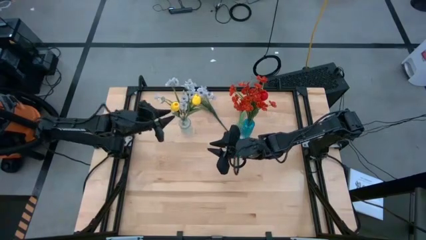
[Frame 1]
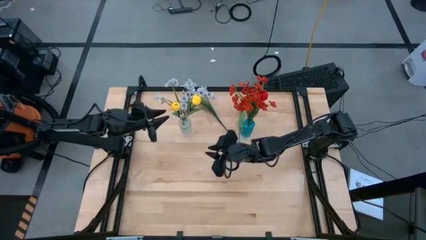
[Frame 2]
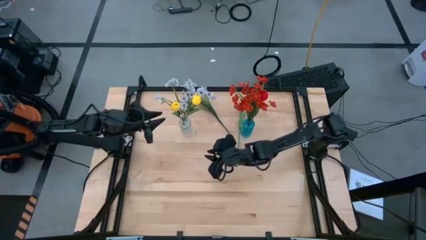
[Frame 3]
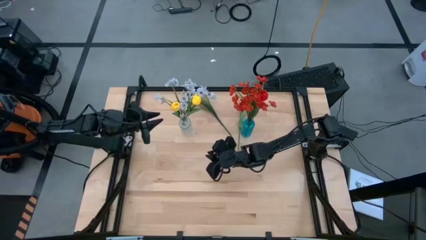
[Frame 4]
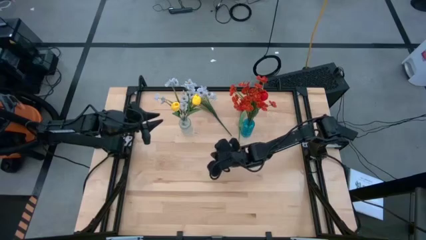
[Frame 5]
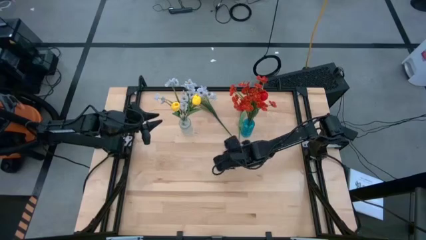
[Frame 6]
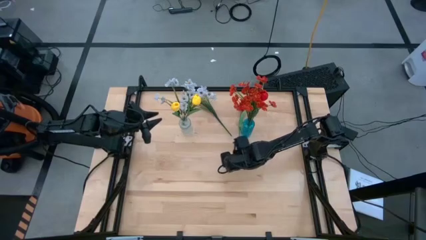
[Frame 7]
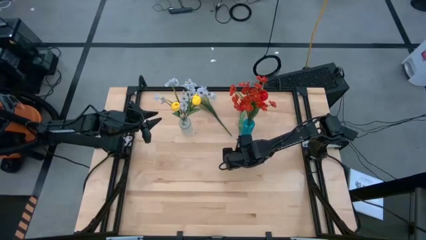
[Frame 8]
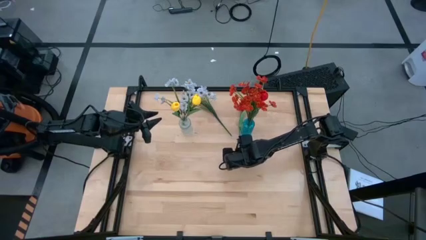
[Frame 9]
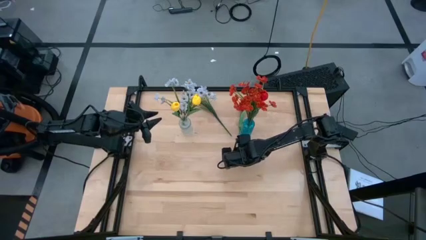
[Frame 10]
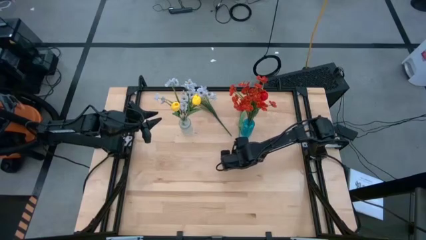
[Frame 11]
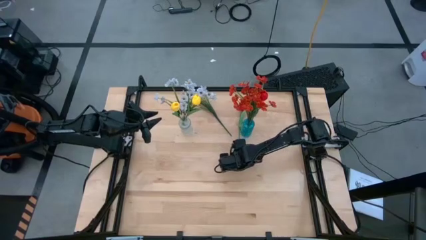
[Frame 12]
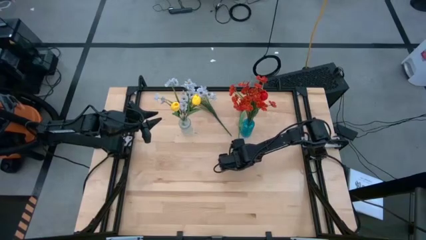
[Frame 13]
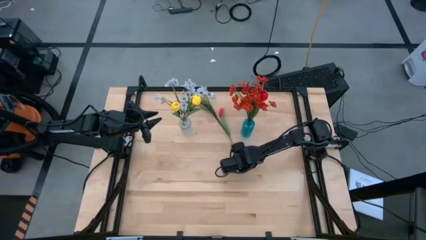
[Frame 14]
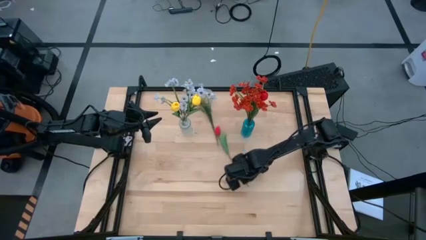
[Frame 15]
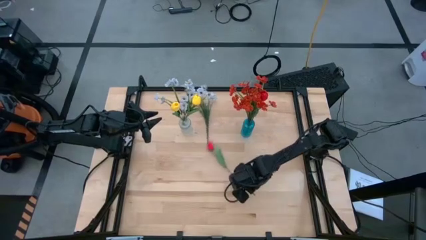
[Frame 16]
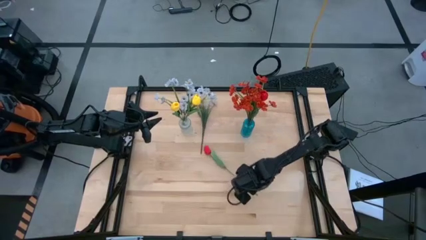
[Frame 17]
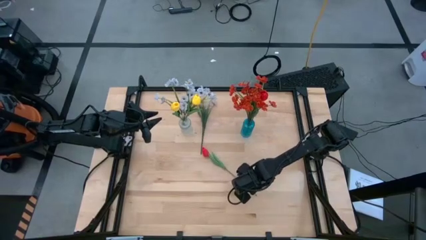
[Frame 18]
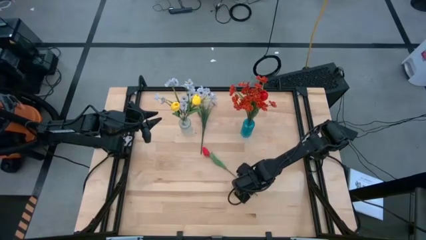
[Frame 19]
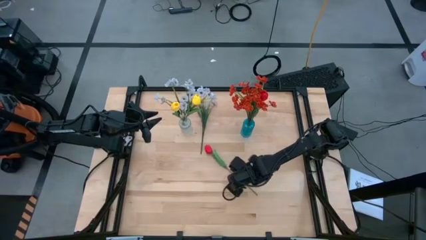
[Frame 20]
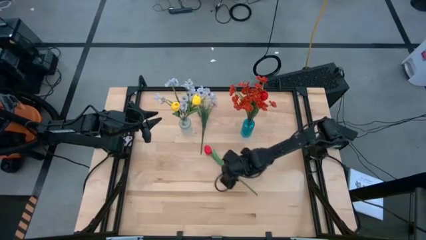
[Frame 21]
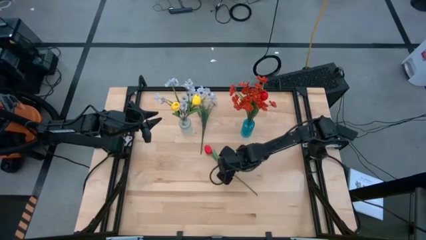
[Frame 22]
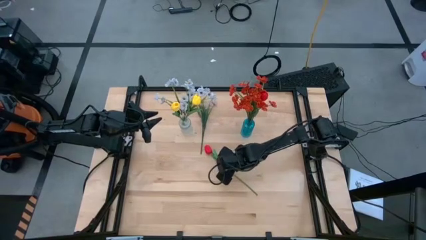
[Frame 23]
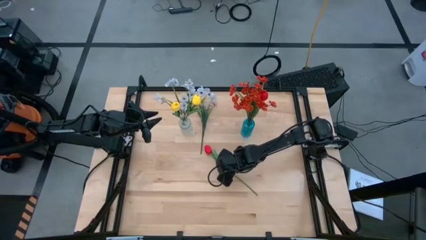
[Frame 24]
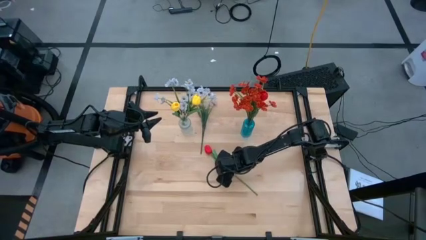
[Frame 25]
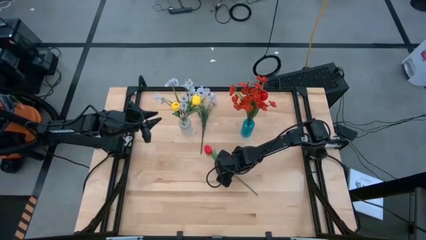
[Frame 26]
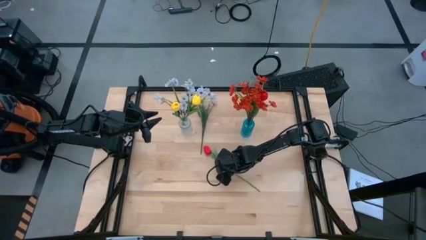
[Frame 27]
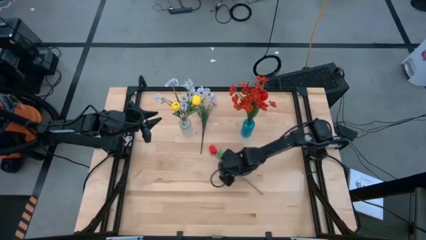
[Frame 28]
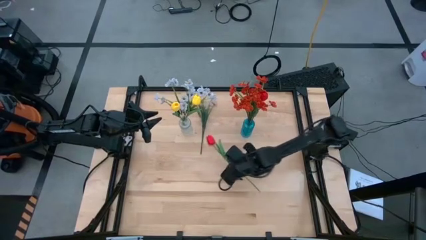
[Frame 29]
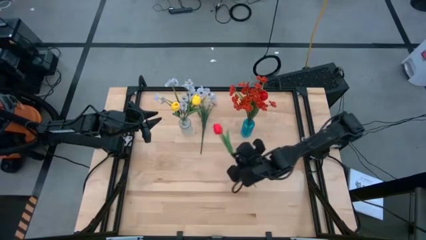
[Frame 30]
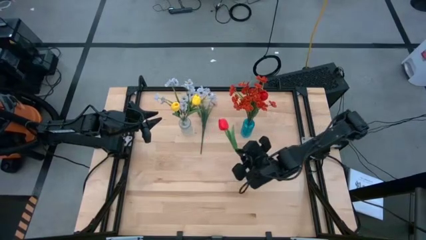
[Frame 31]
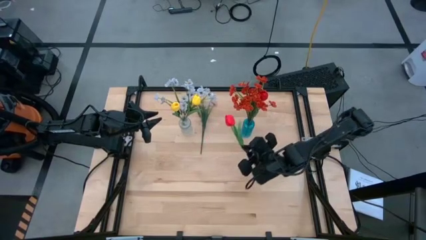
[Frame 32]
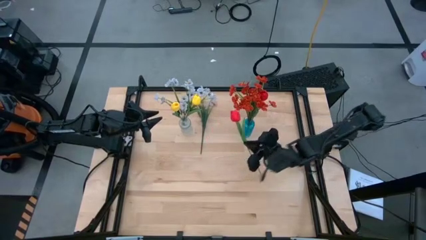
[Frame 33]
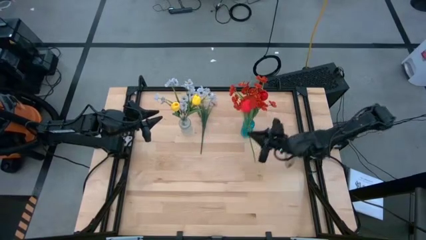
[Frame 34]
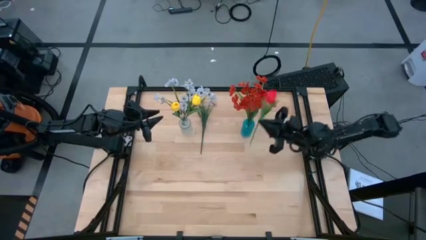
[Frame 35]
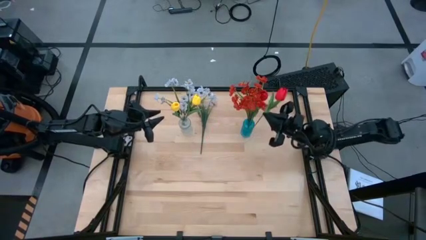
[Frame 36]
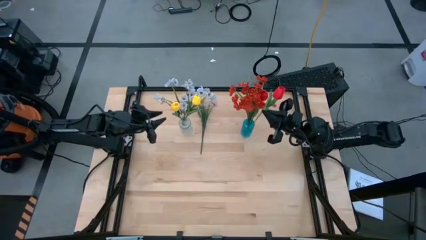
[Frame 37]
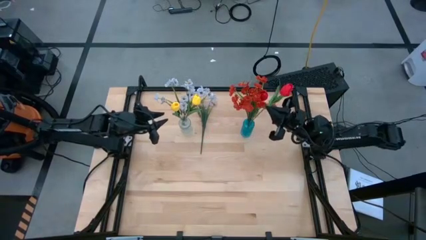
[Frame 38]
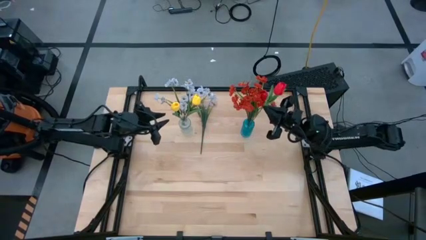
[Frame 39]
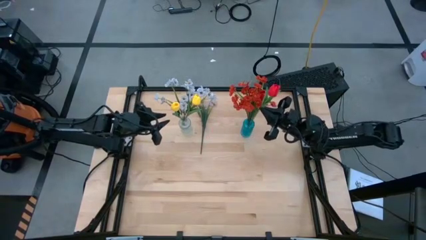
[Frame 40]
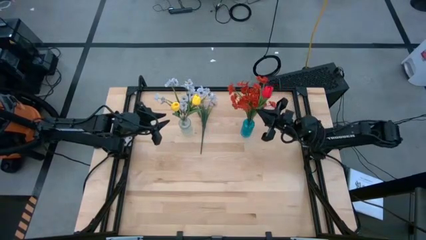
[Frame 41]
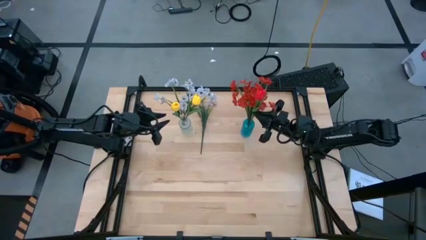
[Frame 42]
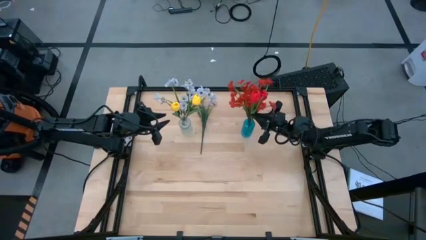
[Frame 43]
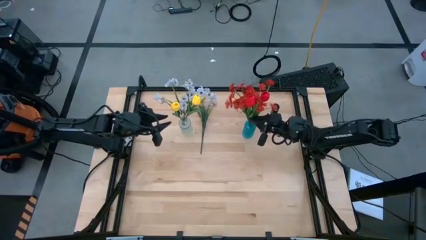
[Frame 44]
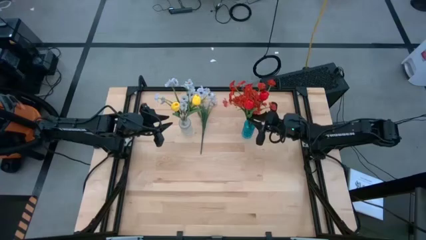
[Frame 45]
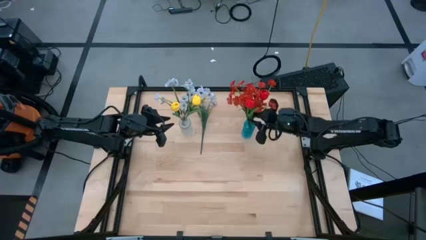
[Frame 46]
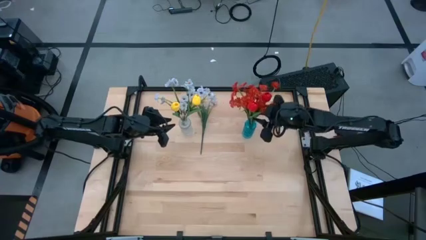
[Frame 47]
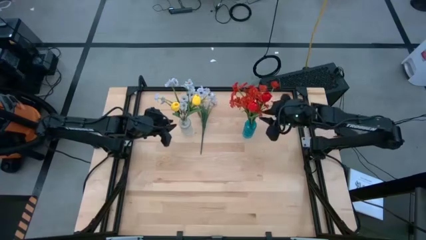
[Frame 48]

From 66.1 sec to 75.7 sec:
Task: Sort flowers into vase by color
Put the red flowers into the blue crystal vase

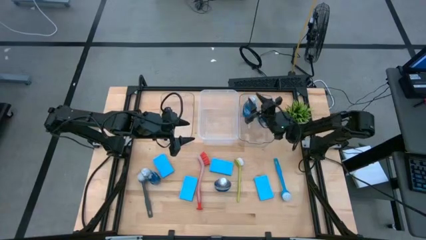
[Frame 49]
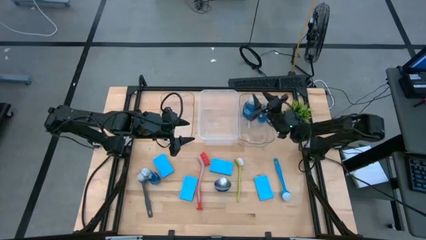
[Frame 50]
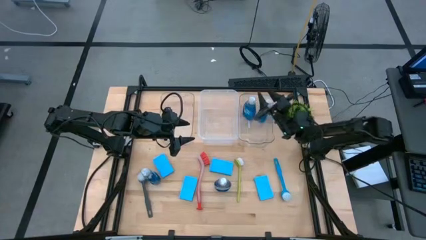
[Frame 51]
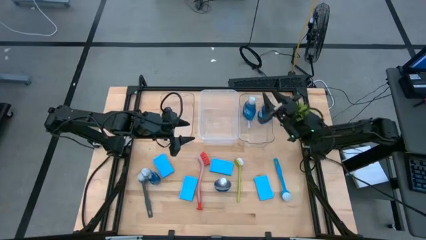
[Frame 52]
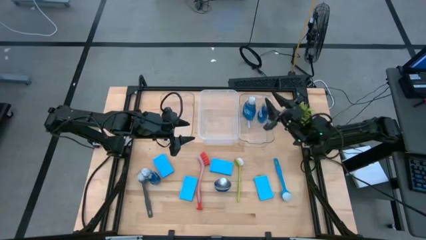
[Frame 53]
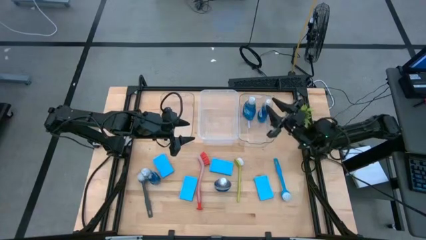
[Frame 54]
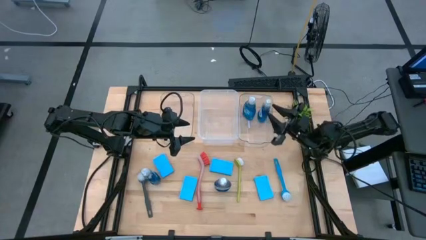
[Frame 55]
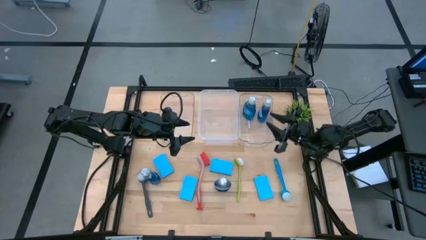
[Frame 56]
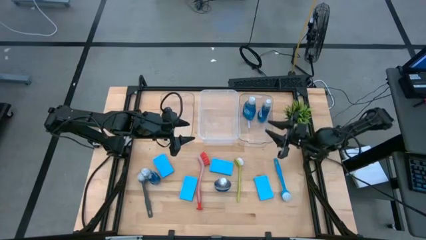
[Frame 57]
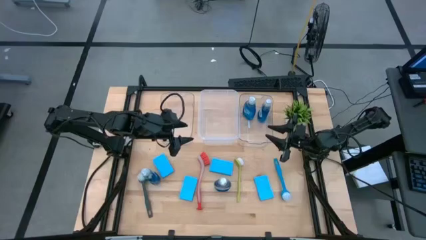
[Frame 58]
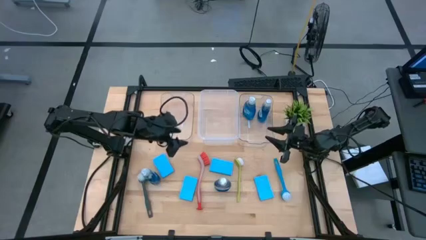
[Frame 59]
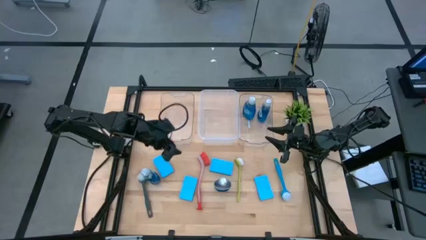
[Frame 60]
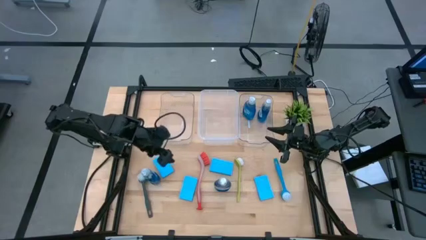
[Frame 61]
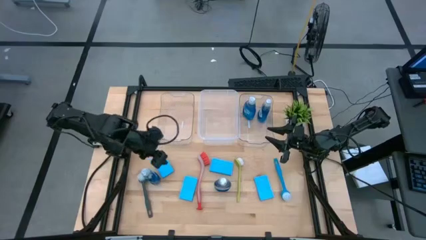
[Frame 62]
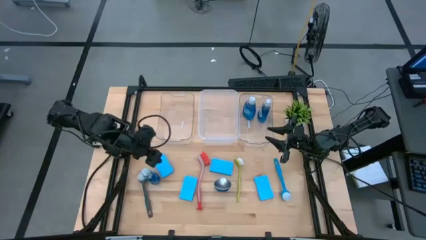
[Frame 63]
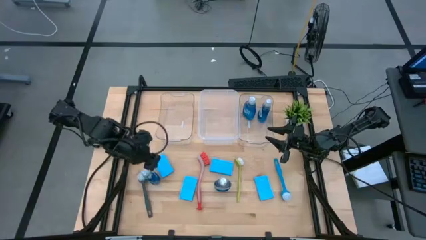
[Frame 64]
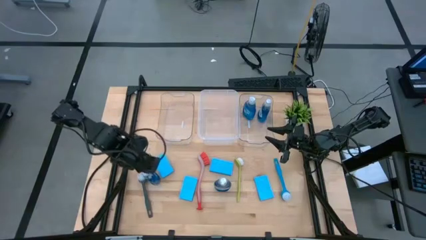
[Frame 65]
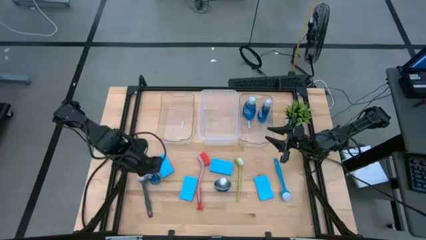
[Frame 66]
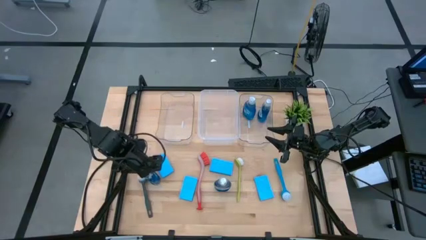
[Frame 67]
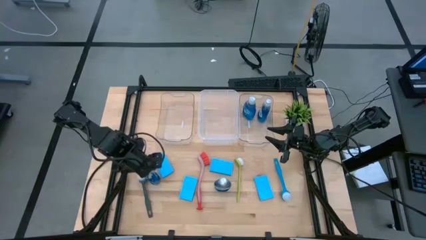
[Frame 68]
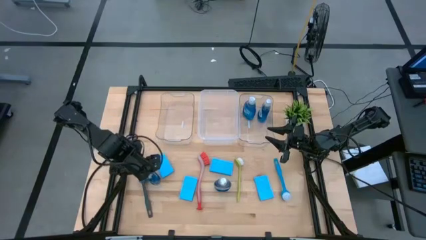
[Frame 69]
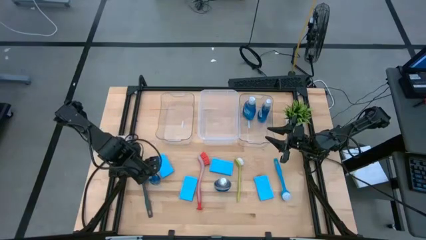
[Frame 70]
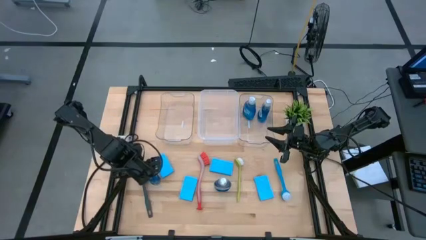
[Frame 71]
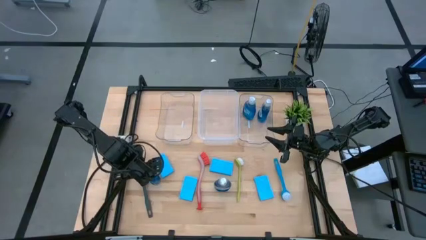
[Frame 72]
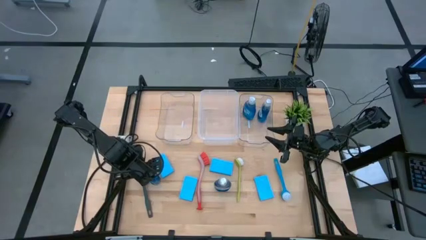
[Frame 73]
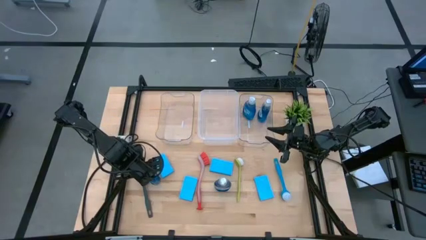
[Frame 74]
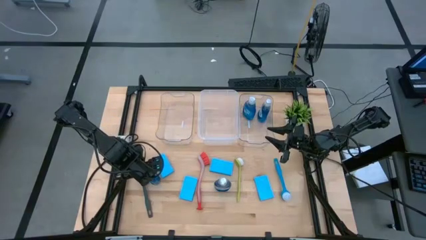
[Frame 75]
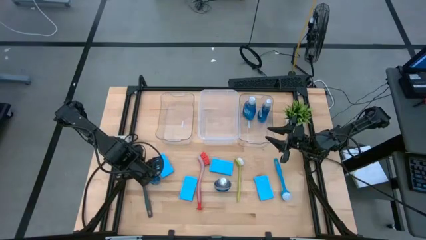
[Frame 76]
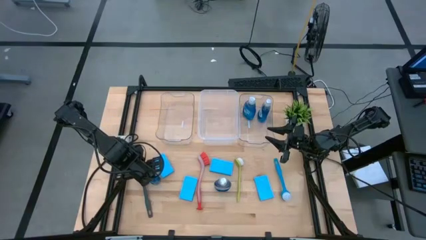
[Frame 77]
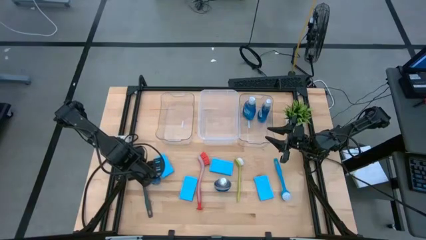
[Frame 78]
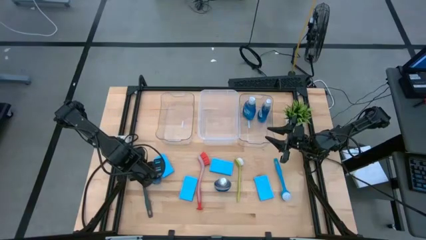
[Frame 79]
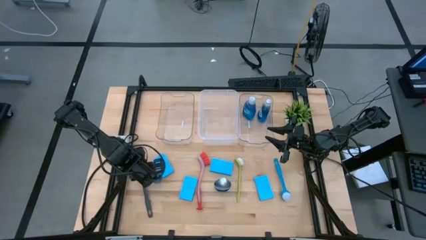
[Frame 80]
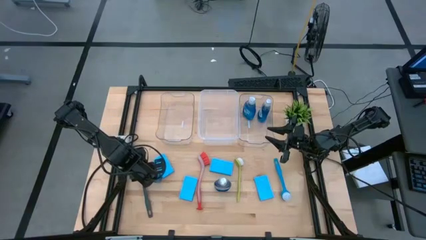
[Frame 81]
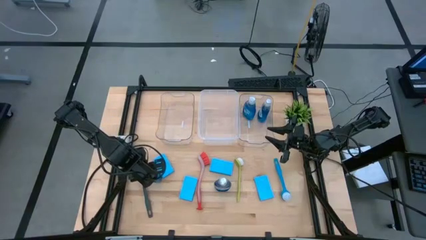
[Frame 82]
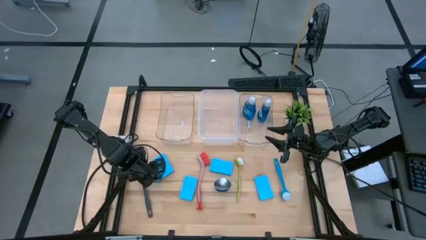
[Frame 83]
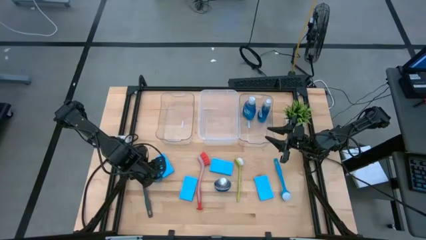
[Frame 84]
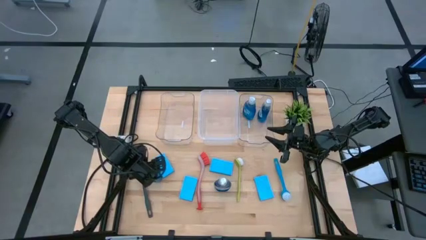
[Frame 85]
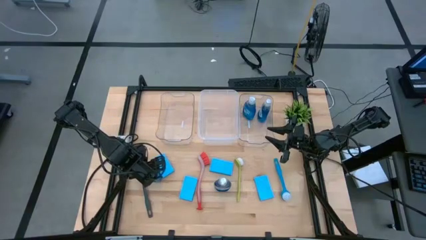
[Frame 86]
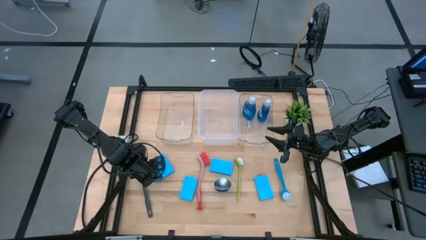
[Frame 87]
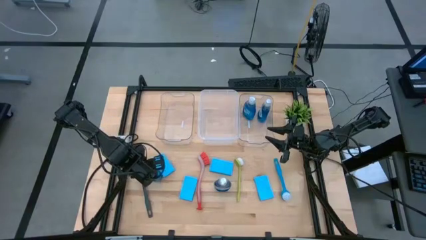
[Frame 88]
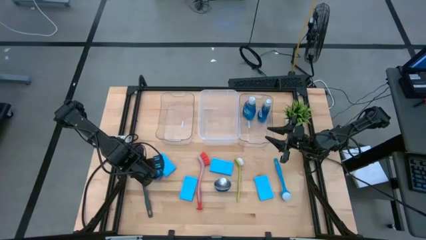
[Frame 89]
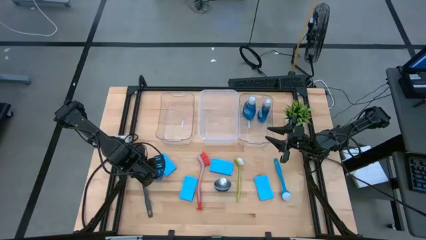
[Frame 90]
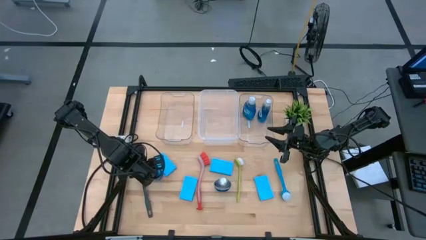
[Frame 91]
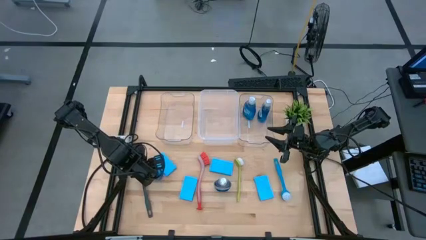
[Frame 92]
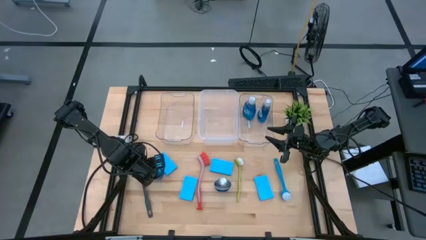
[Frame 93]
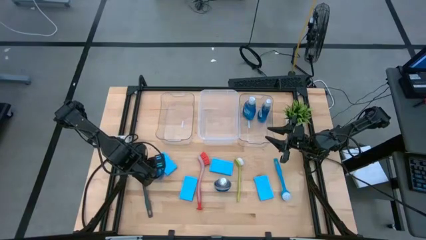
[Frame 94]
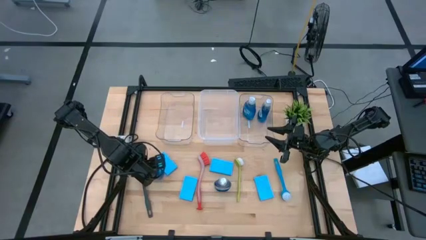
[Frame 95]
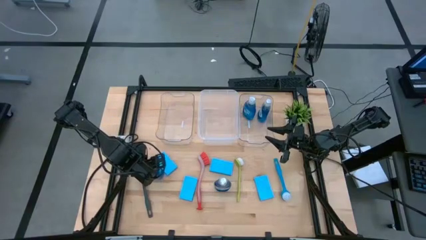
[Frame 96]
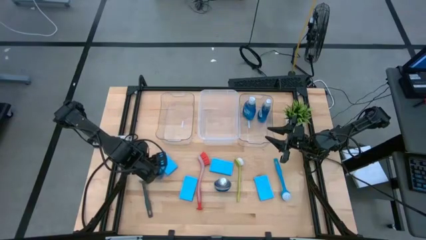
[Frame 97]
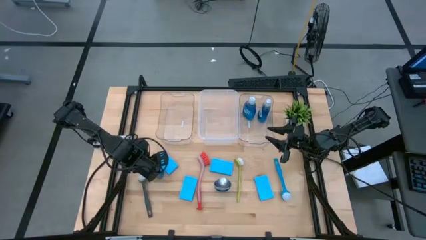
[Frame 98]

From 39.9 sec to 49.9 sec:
Task: Pick & Place Kitchen Sink Supplies
Put the dishwashing liquid into the right transparent bin
